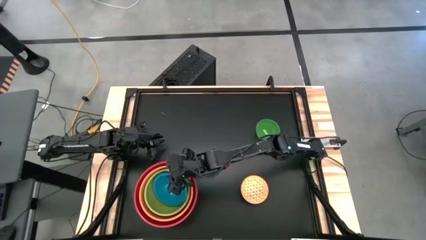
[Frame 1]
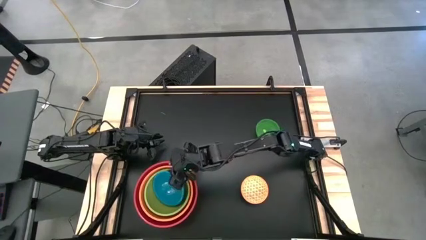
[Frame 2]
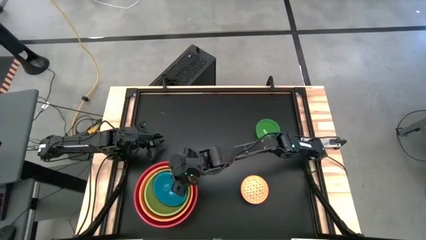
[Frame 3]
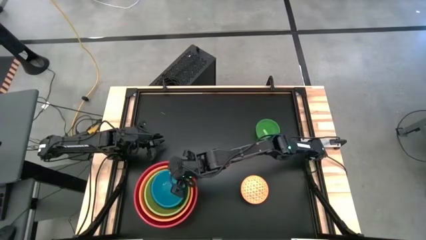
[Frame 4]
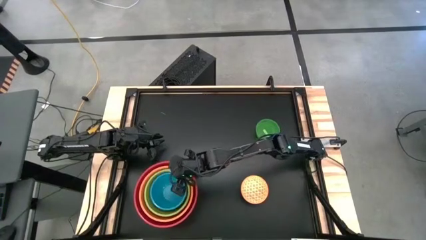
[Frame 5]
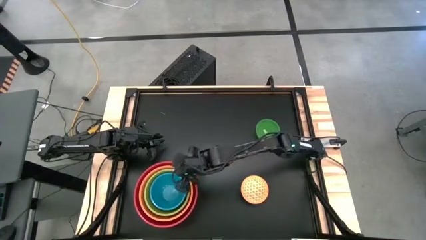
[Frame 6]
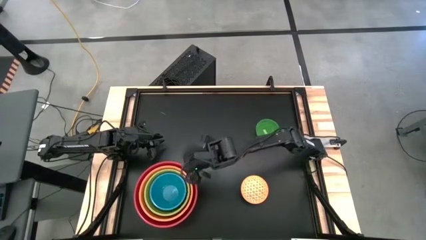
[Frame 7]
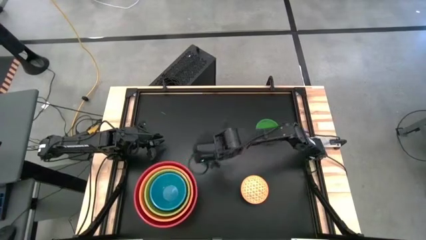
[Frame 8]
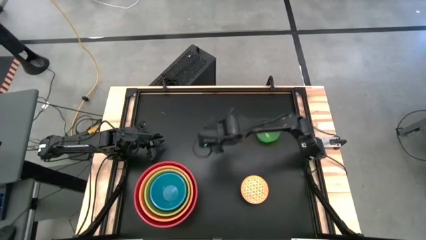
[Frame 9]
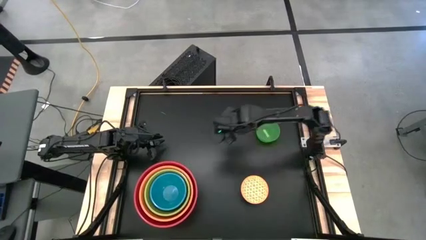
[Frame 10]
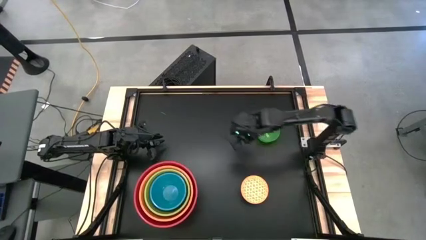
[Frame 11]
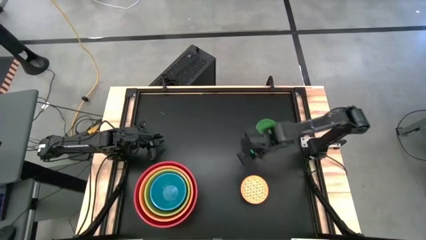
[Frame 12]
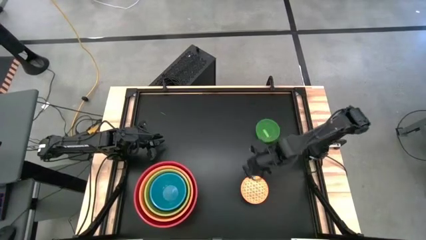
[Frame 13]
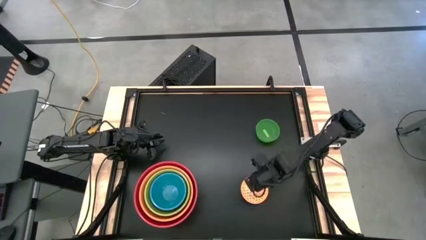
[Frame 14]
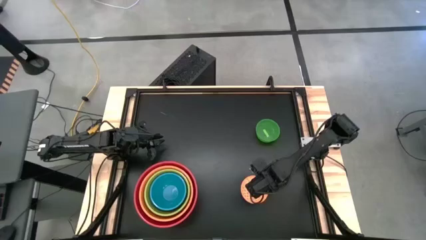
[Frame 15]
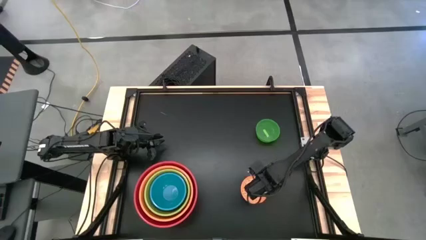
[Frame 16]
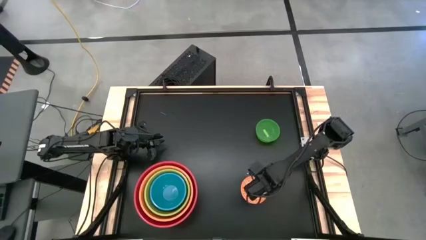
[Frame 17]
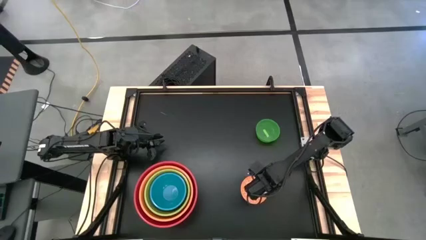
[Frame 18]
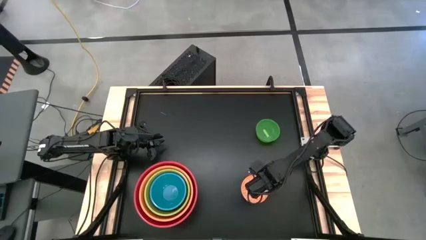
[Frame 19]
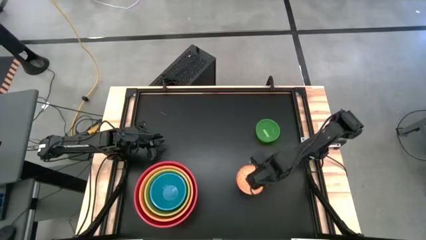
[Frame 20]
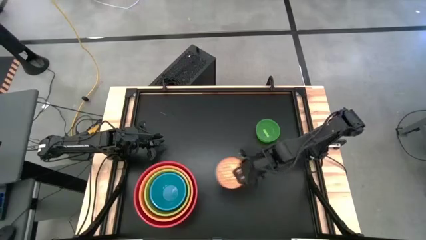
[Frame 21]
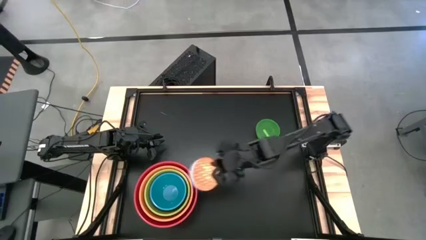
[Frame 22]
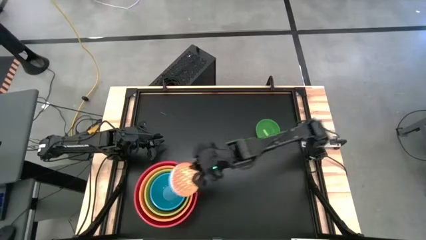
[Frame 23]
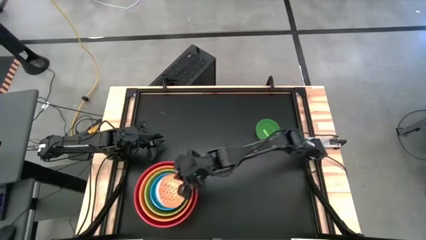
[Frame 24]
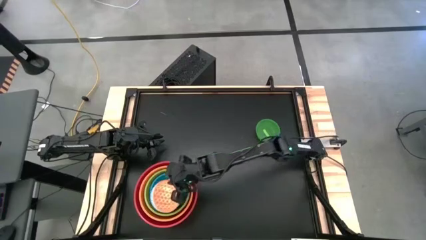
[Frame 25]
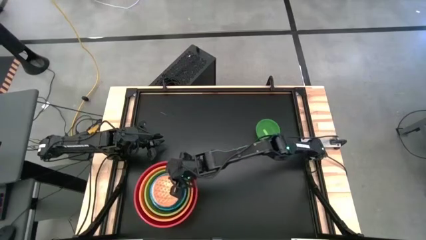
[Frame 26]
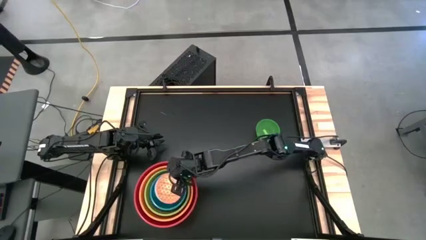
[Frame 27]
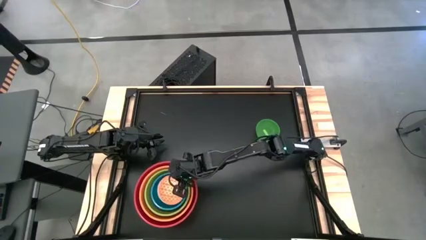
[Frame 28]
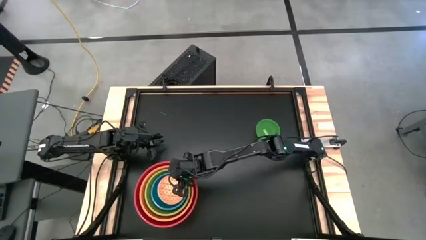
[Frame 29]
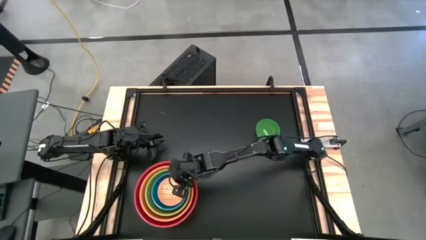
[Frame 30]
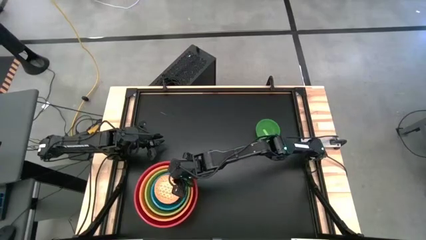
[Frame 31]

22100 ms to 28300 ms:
Stack the orange patterned bowl on top of the blue bowl

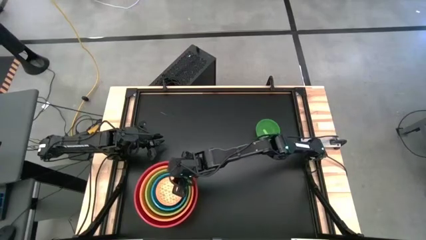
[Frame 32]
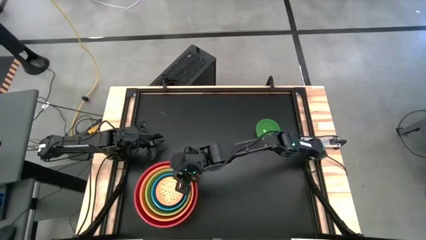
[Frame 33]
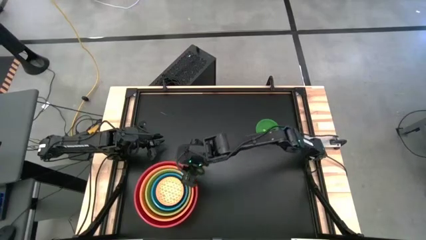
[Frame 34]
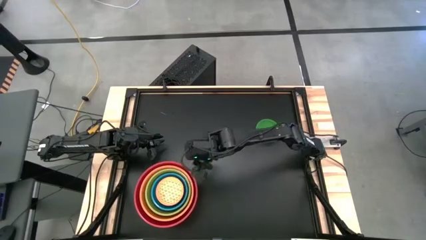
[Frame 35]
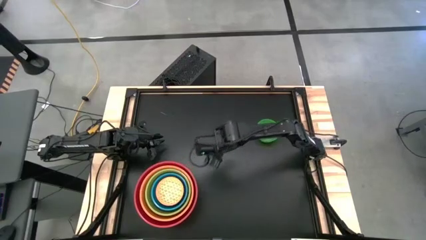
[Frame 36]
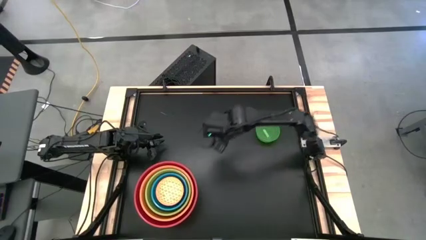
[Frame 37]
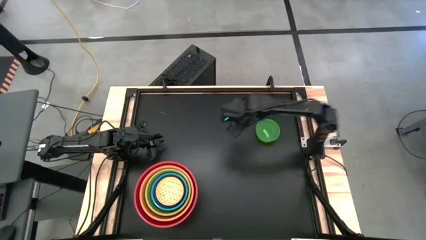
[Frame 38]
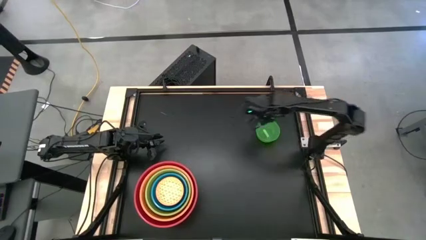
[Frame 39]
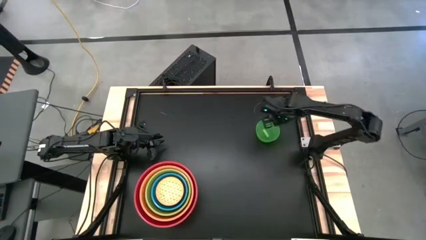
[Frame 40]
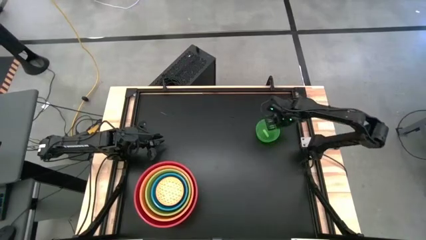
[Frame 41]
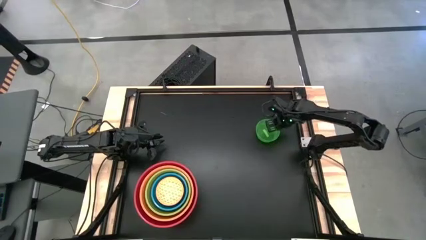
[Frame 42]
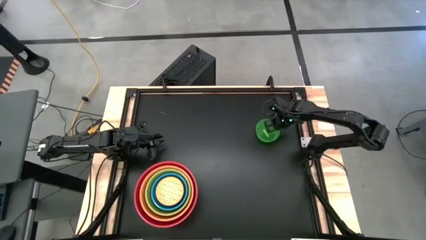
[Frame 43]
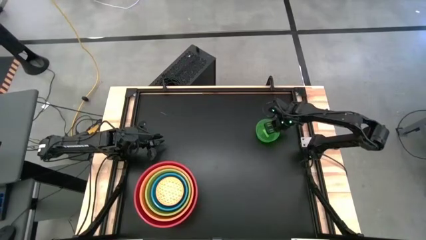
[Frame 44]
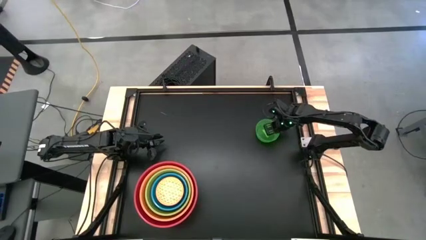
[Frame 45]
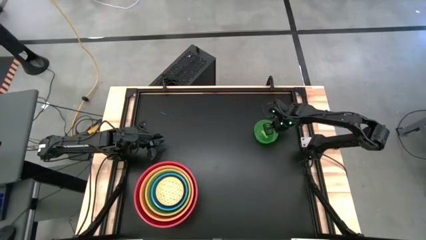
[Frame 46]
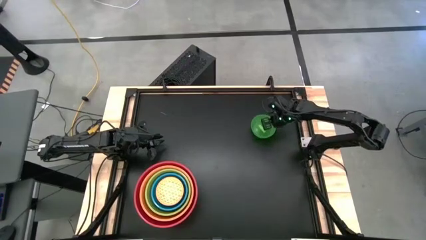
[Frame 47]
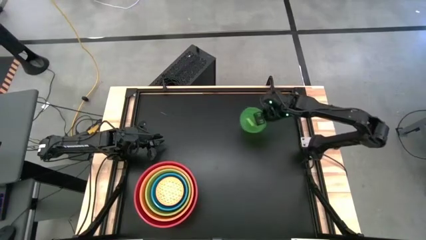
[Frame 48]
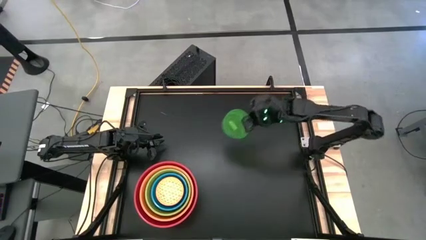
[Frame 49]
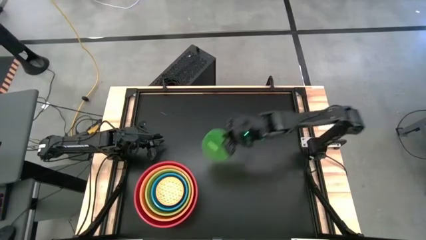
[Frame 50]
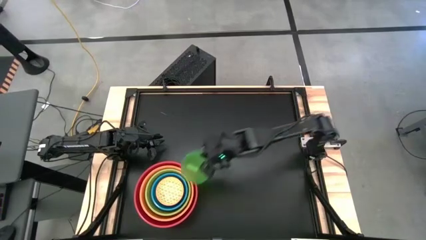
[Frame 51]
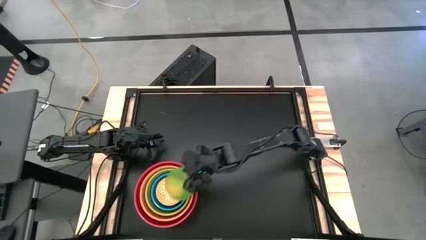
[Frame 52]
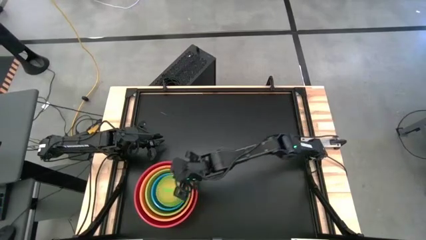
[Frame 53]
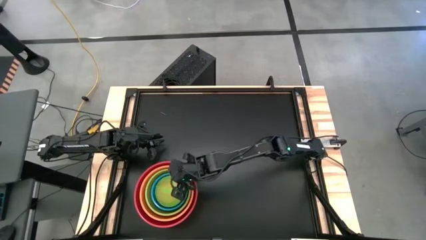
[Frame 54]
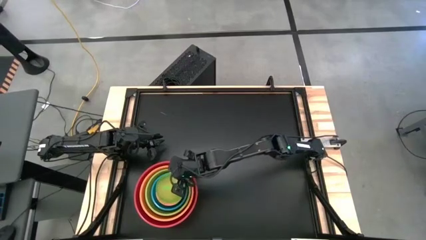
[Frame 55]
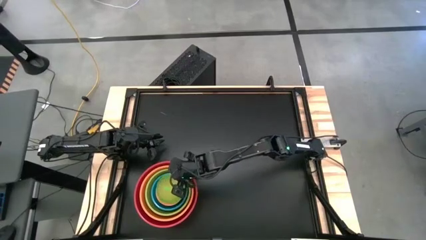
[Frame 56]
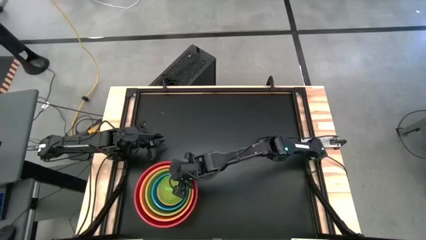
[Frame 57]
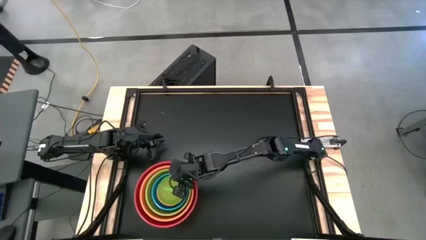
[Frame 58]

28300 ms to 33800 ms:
Stack the transparent green bowl on top of the orange patterned bowl

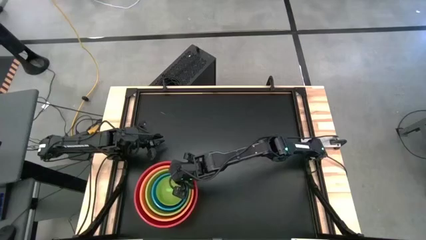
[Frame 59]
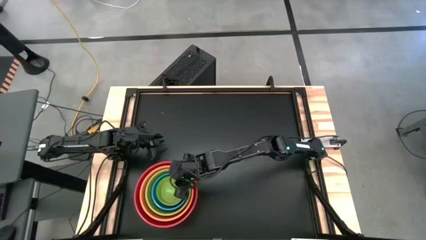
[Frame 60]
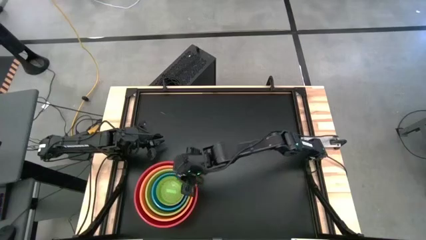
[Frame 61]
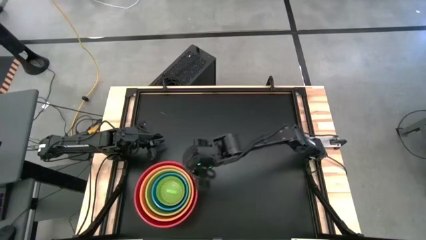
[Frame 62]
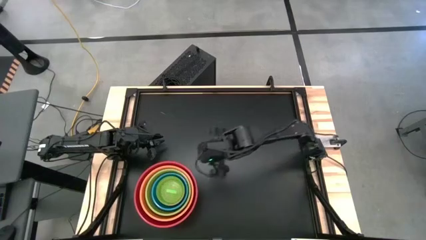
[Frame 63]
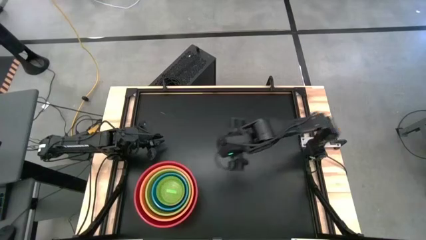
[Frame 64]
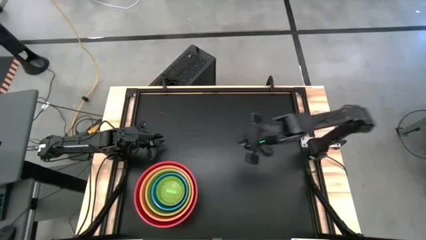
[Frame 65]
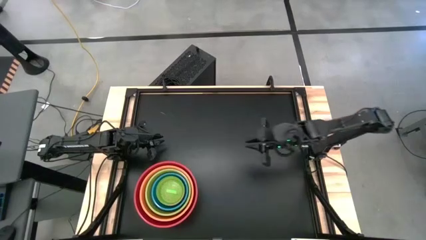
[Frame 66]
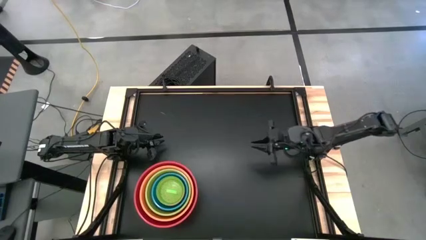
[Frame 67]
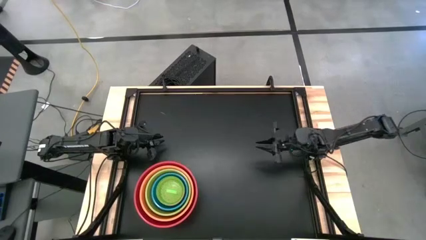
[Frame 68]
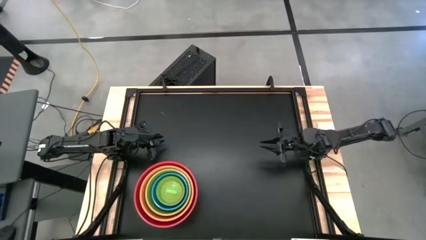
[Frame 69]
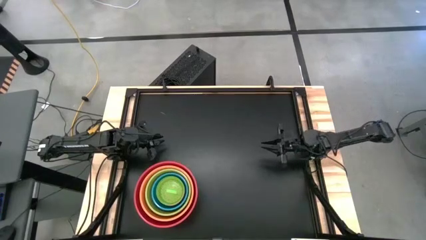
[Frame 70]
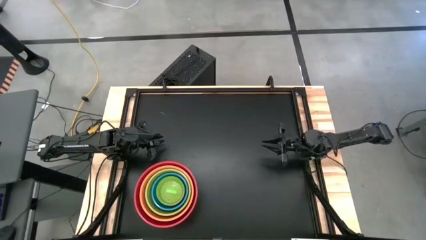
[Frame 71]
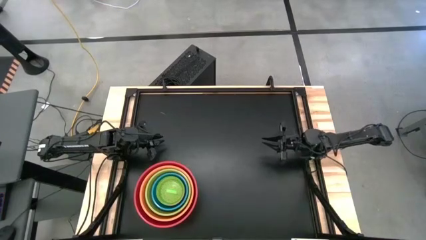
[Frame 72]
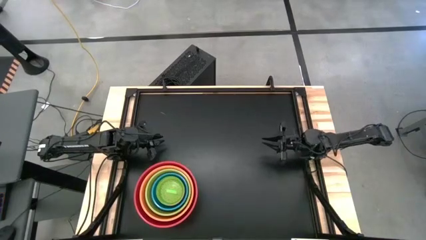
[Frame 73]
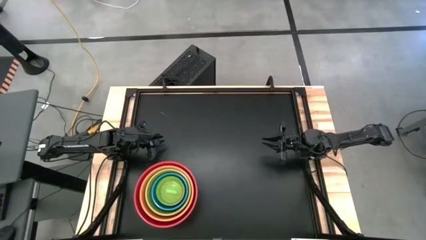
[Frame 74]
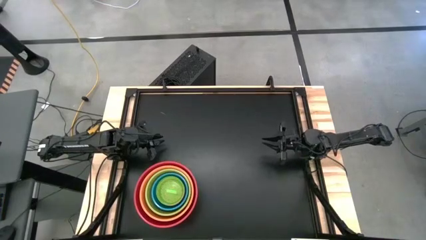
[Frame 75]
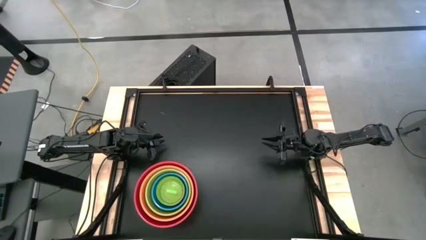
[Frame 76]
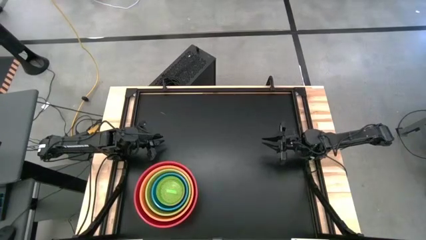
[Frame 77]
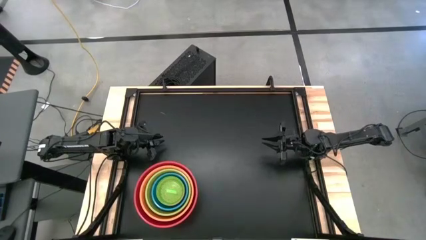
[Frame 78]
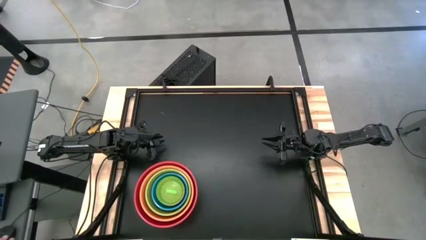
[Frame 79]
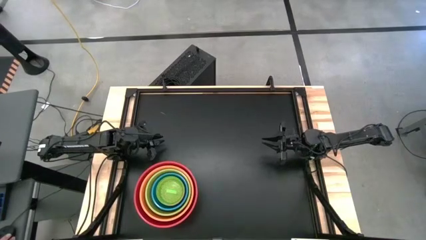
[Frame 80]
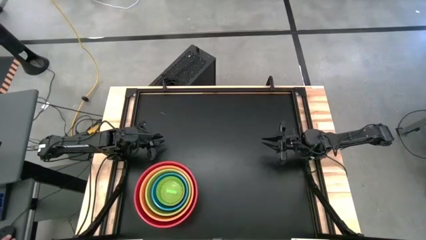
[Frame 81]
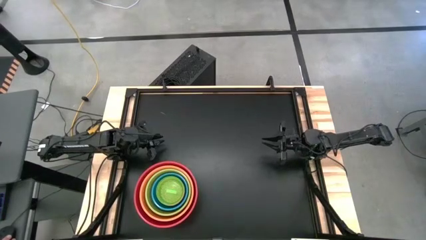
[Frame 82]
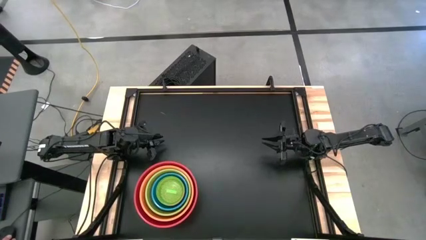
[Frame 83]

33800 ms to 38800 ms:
Return to home position
